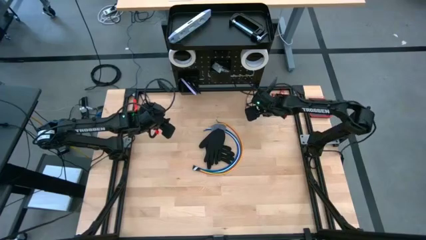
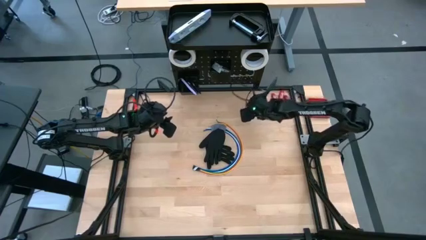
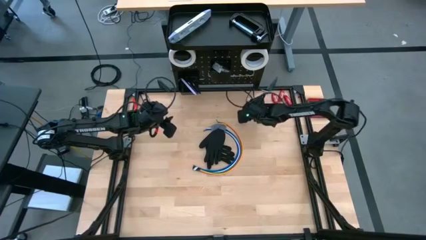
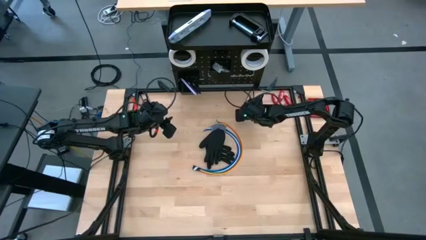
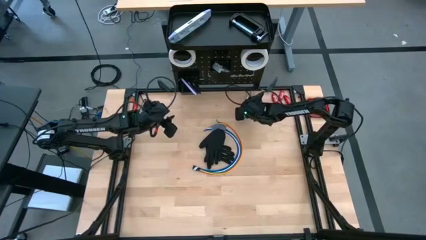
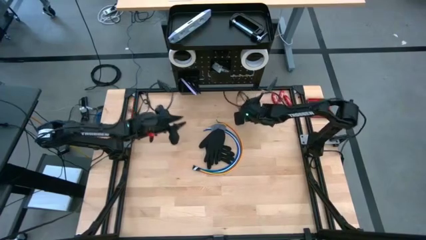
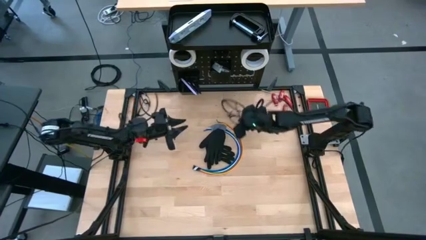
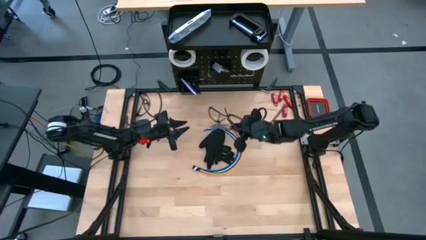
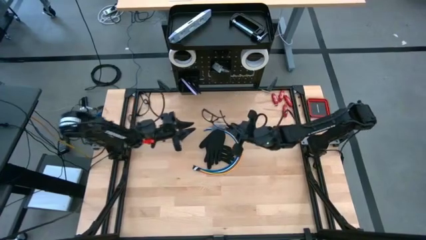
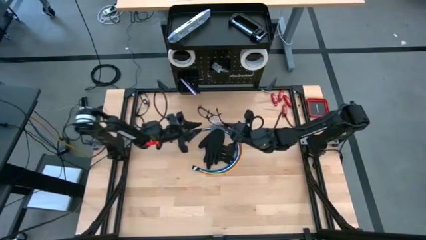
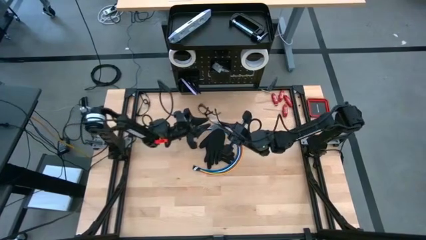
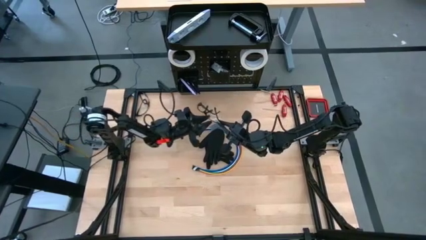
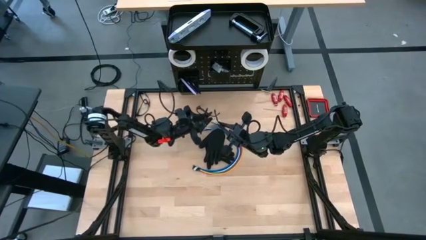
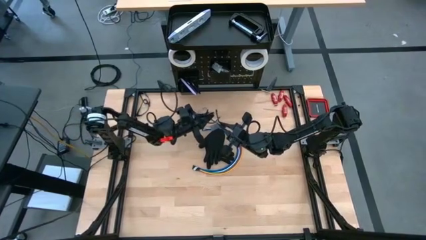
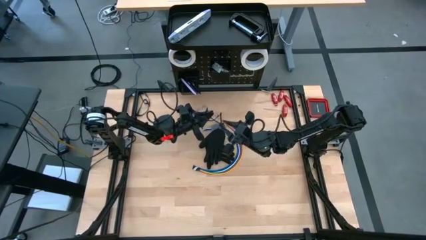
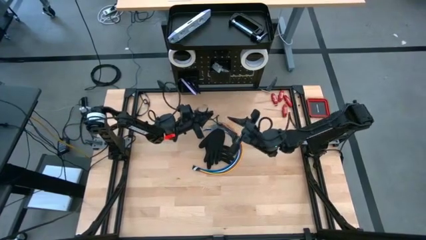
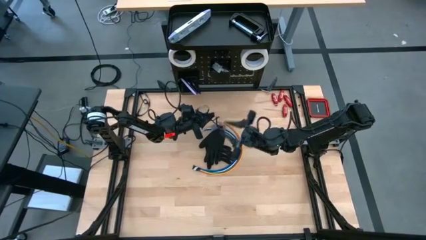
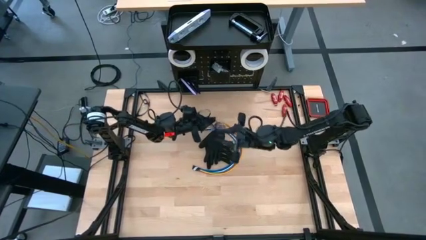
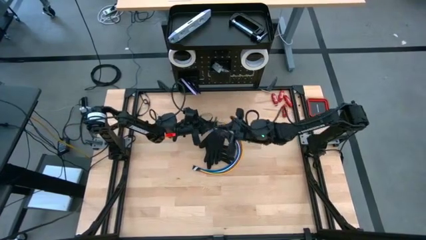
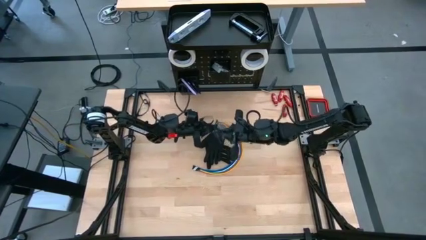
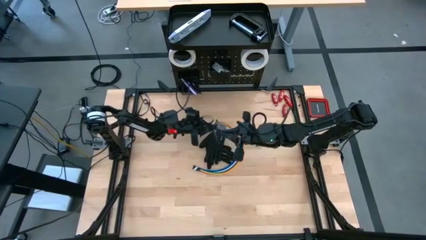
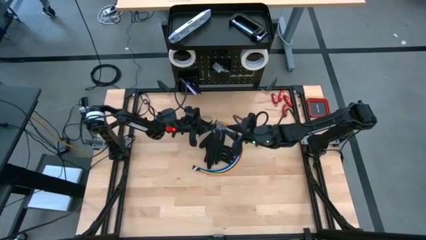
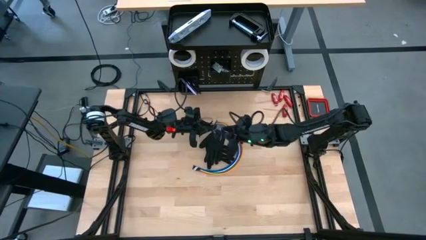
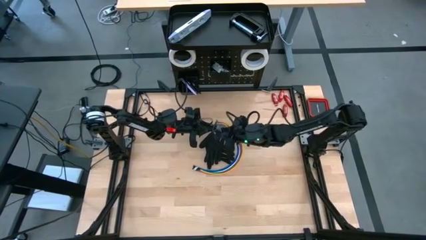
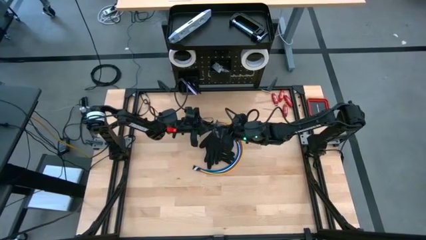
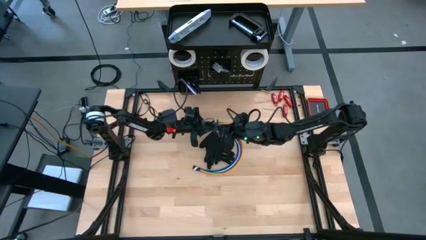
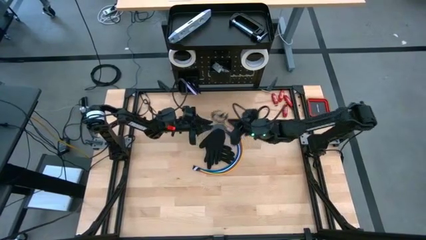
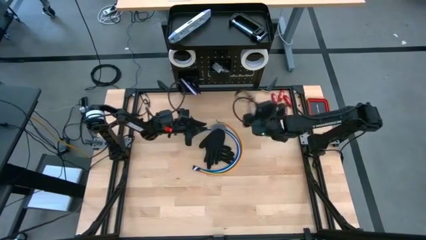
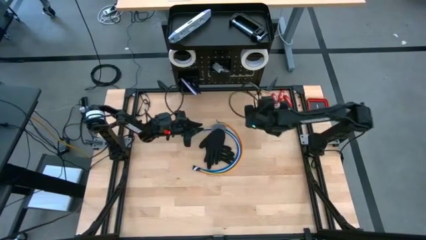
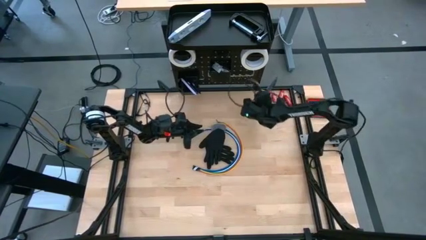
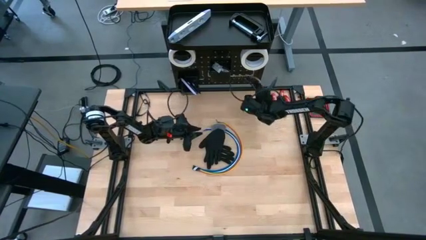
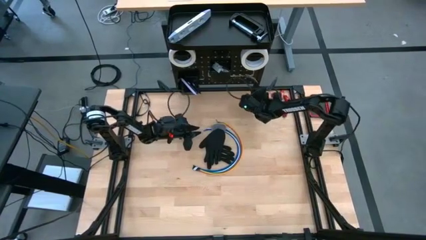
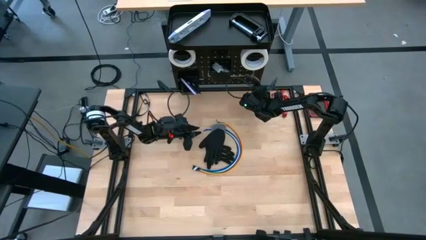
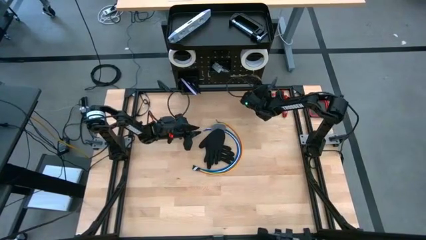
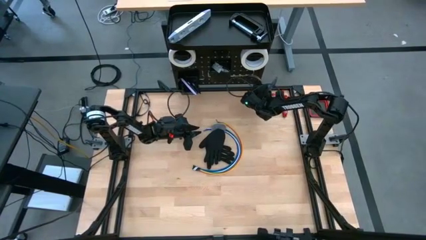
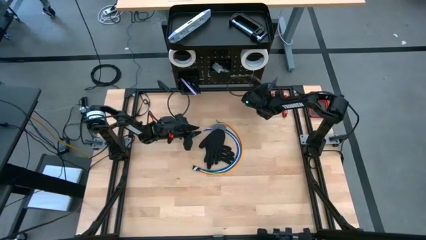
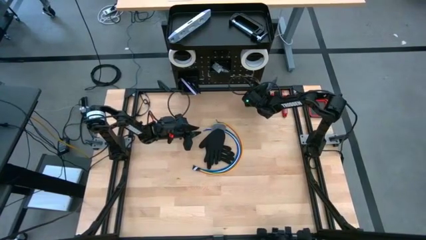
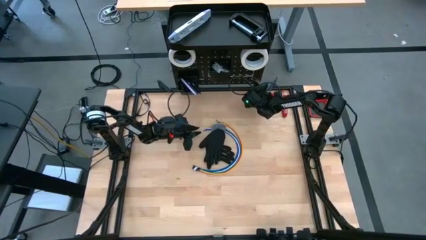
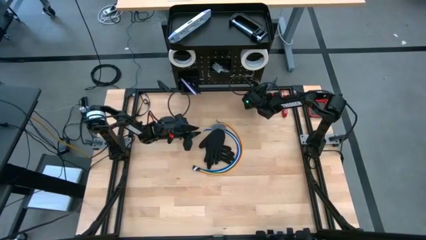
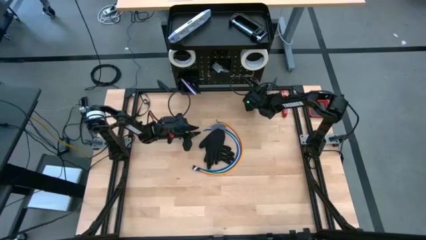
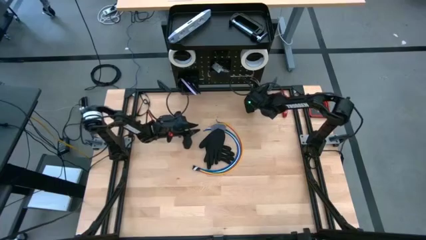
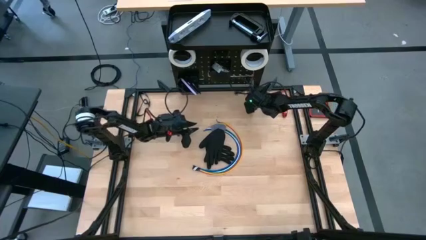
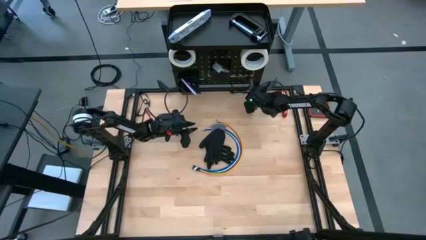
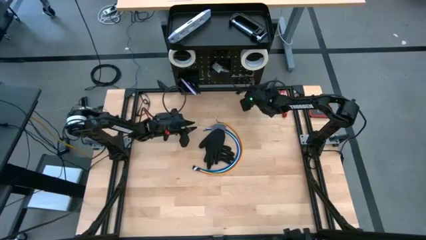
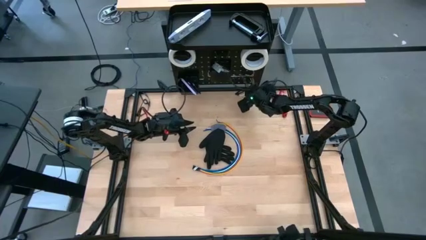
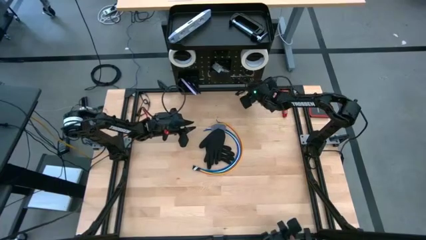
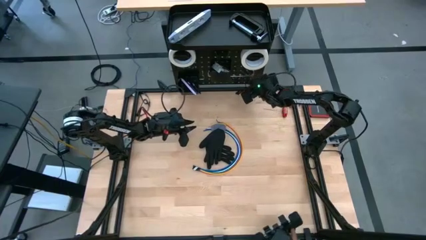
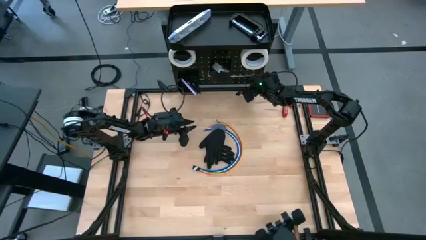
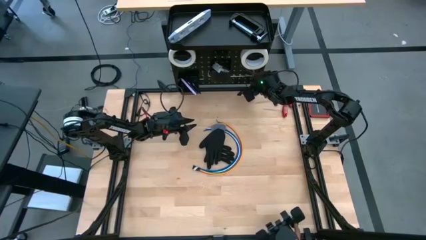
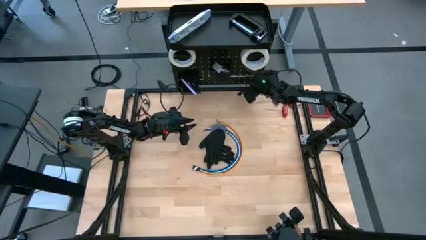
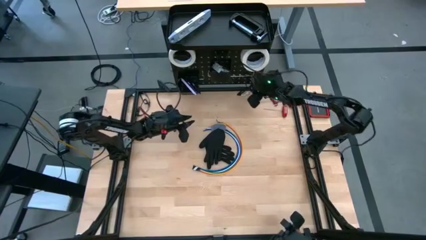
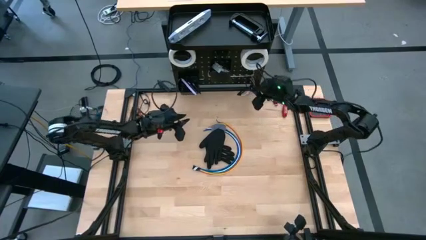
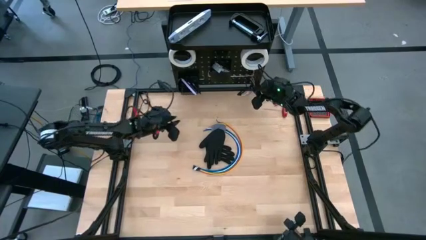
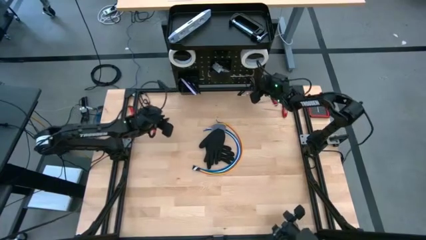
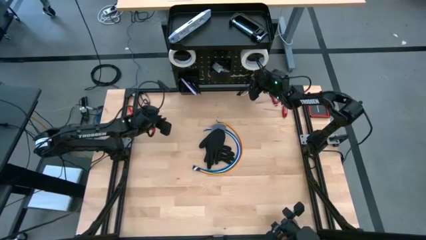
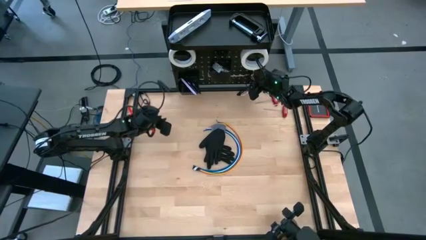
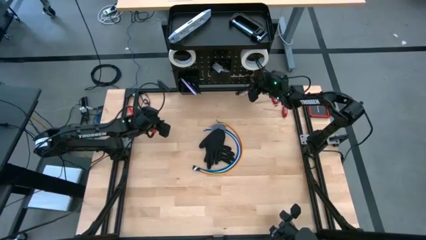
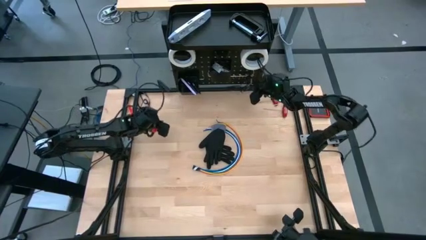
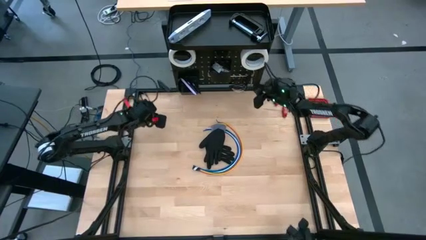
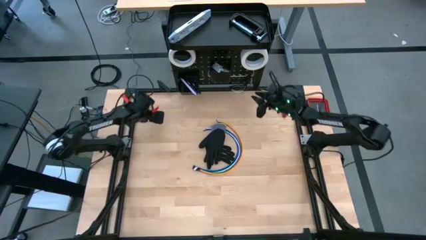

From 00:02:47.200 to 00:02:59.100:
Task: Hang tools onto peg board
Hang the safety goggle on the peg board

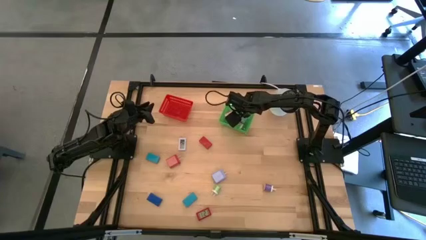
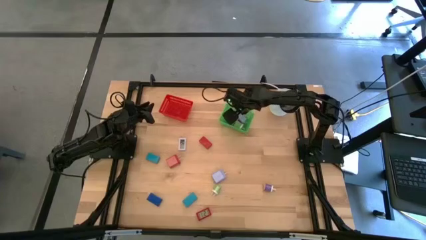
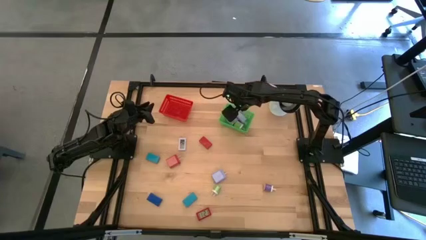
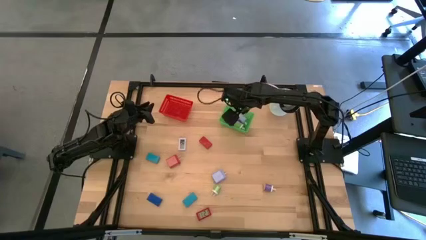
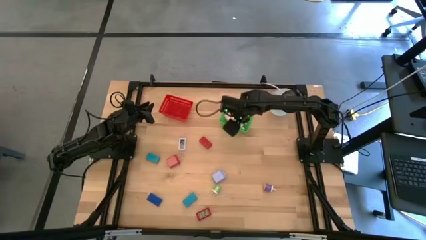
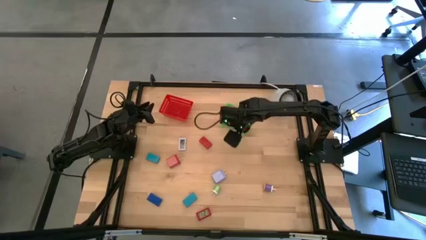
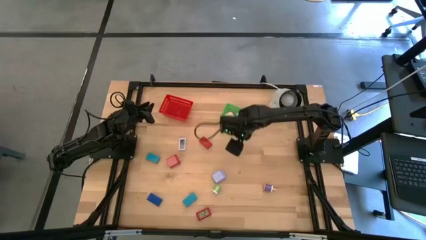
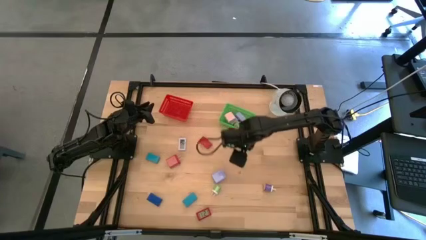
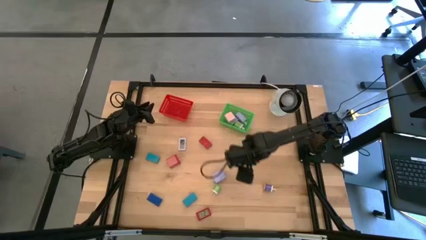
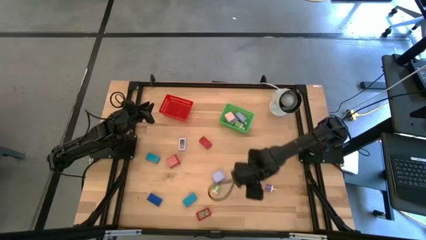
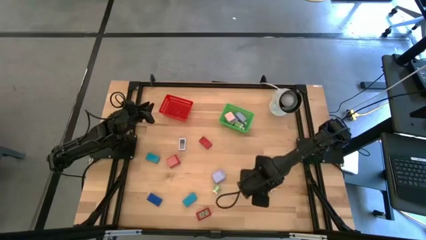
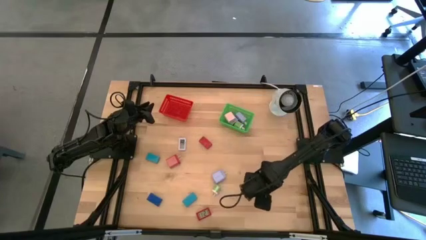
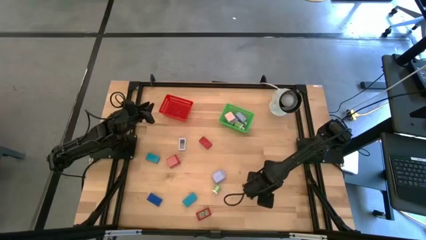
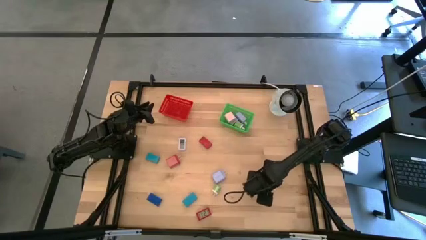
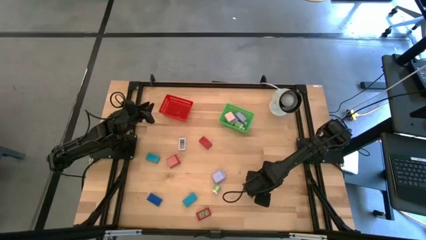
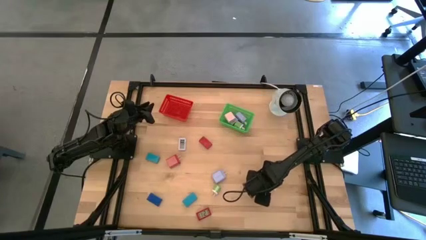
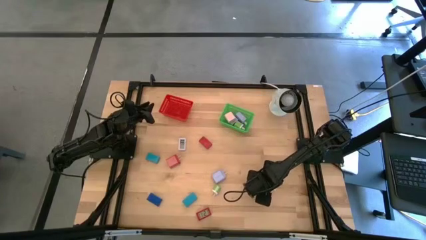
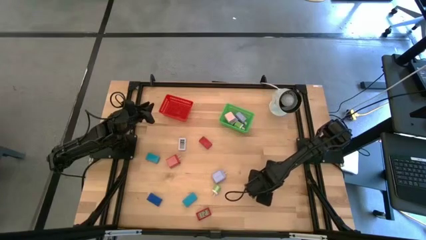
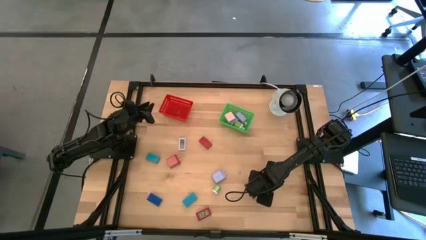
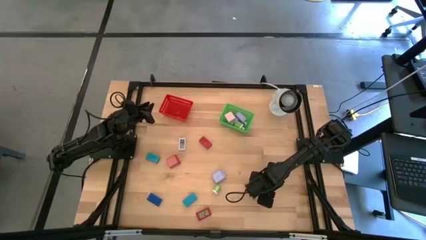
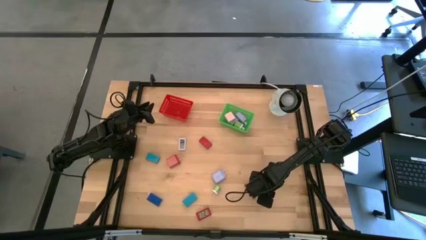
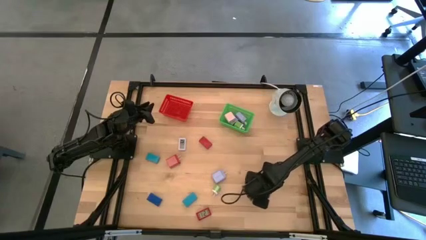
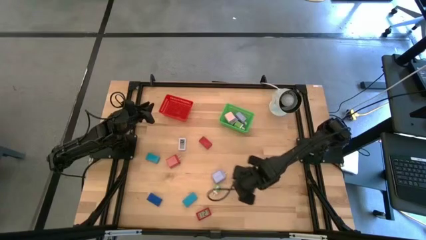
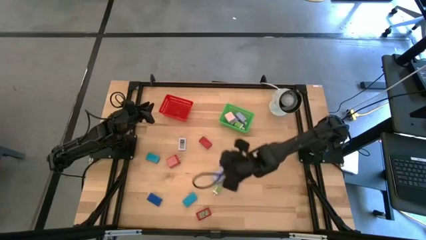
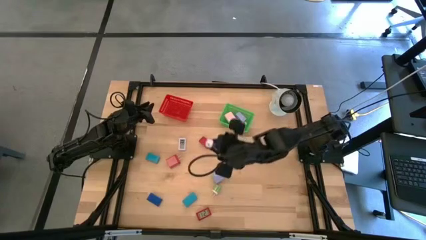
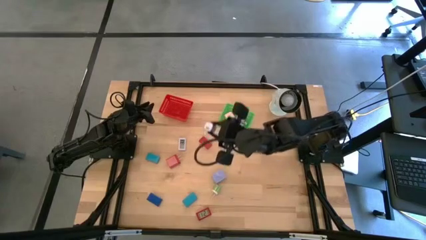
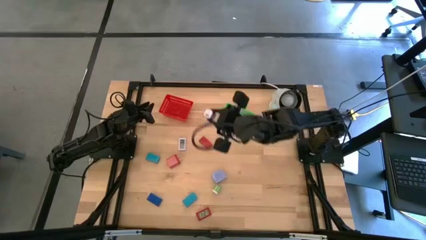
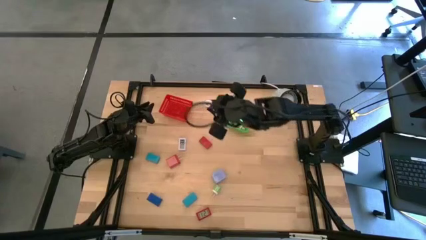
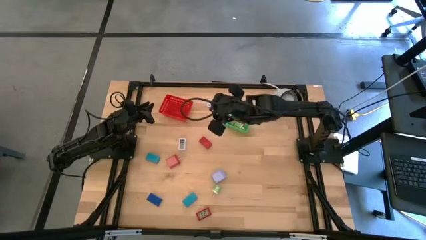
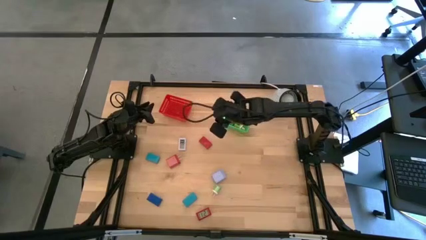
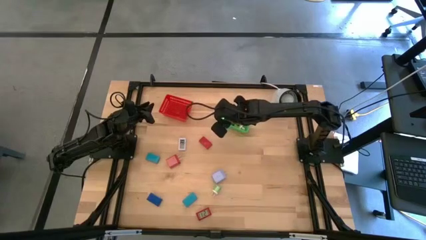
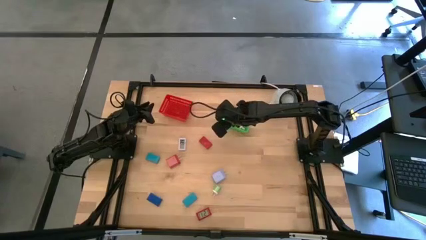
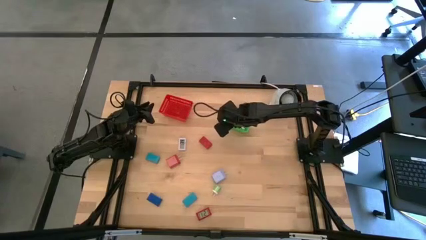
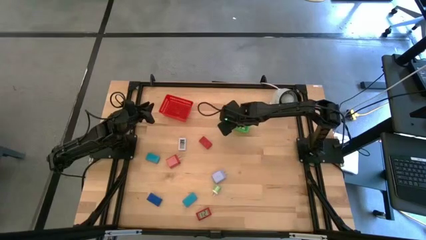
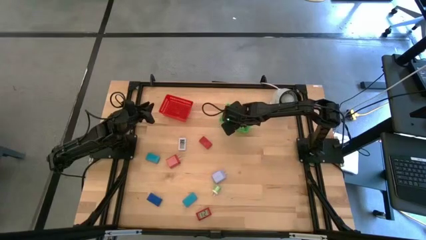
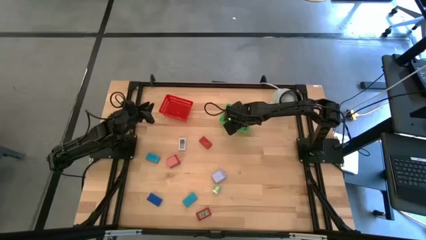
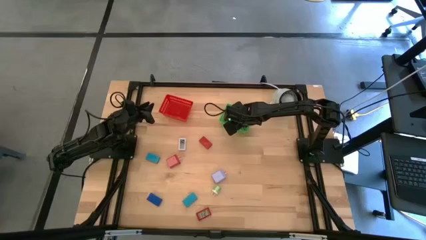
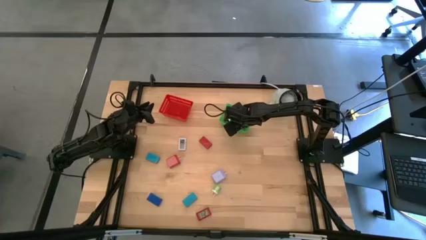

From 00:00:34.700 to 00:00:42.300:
Task: Pick & Place Office items
Put the violet charger adapter into the green bin
